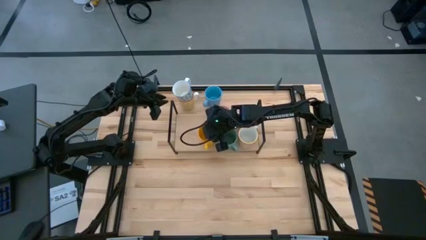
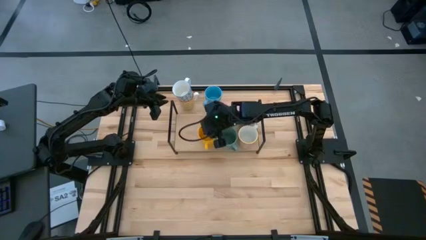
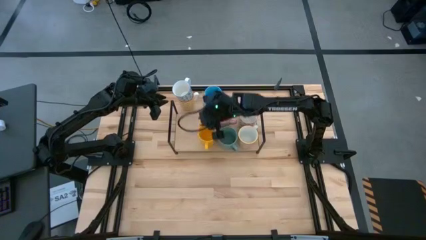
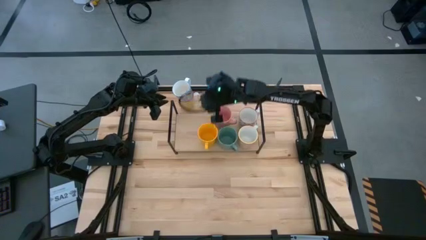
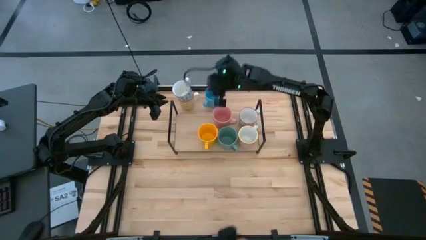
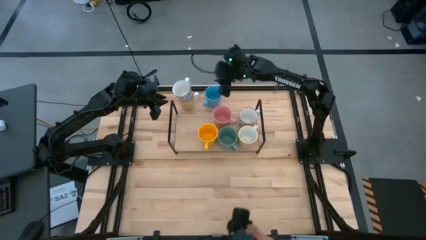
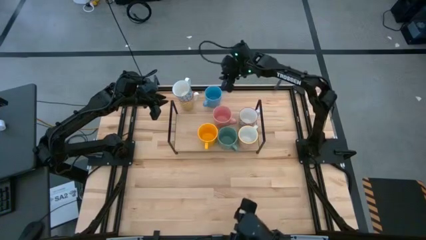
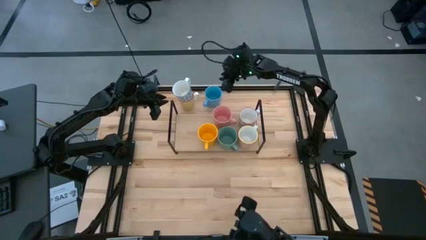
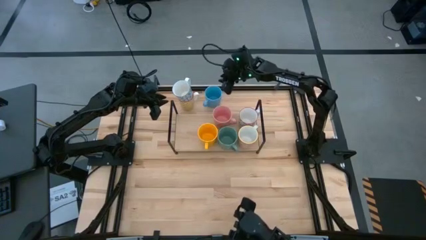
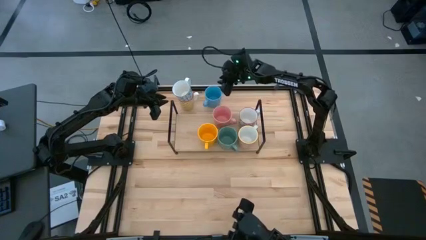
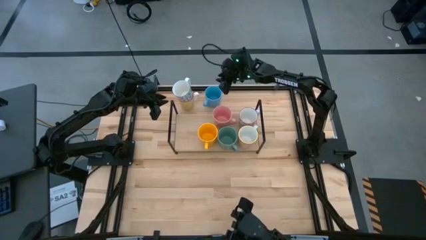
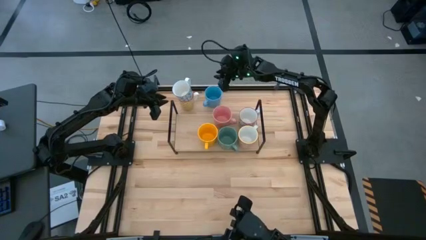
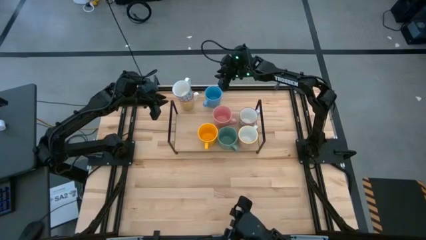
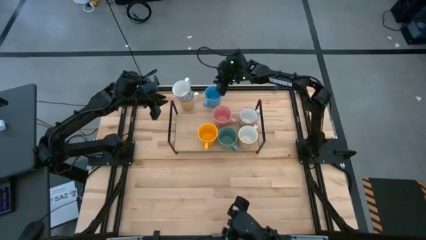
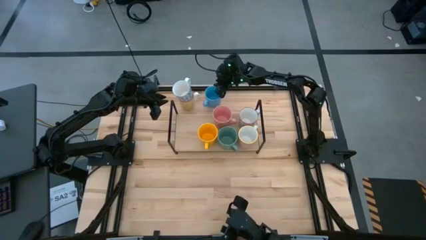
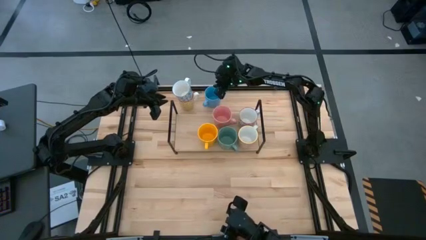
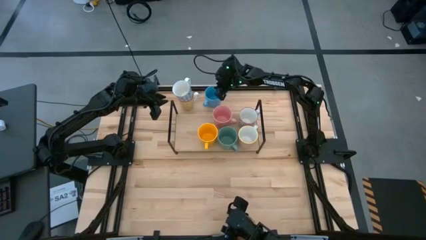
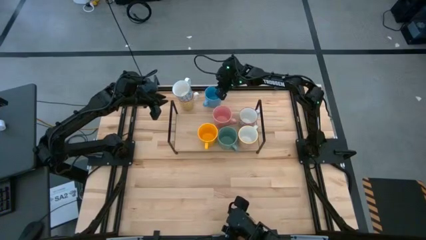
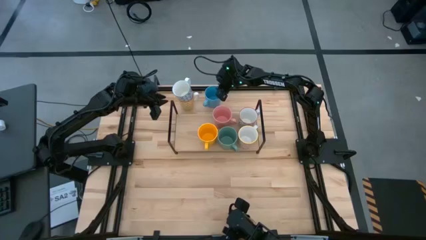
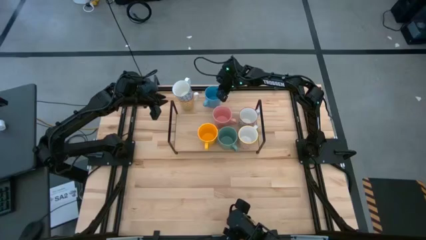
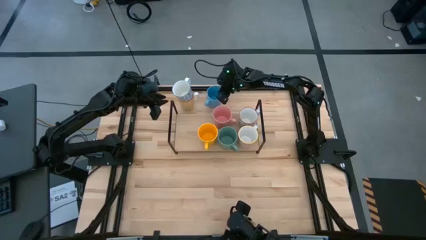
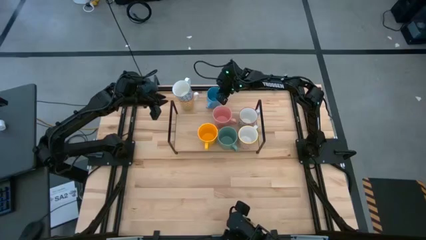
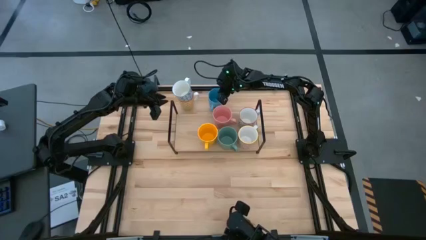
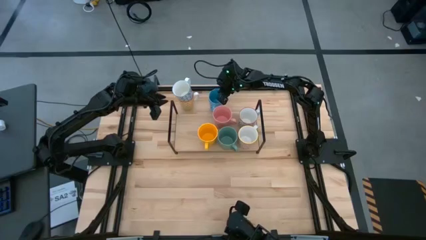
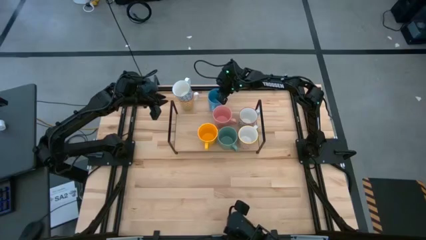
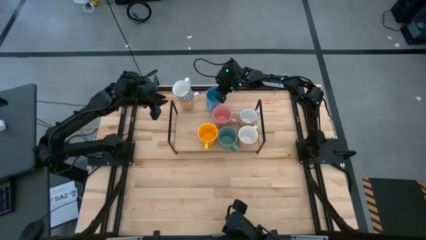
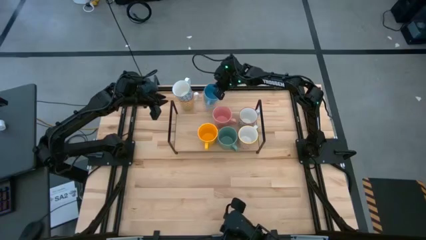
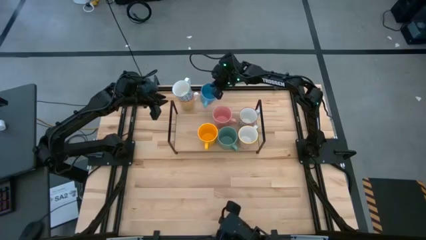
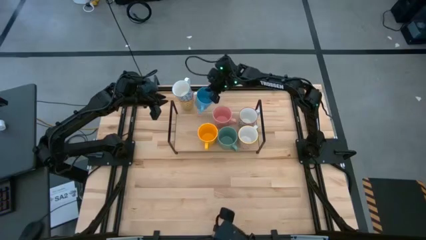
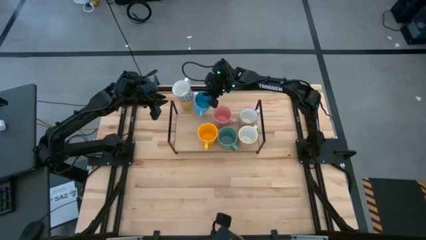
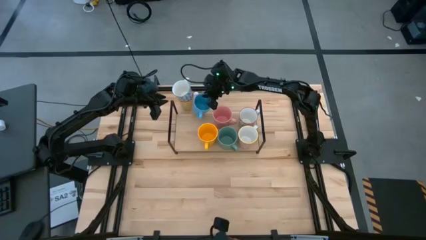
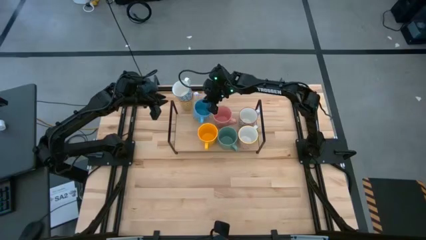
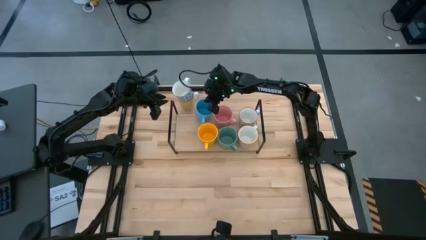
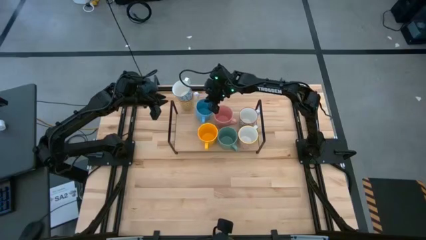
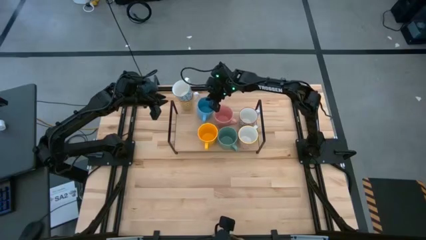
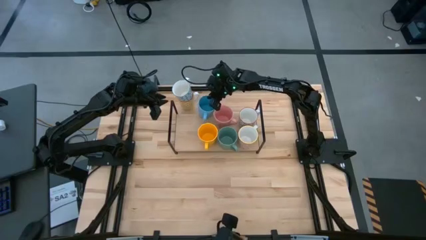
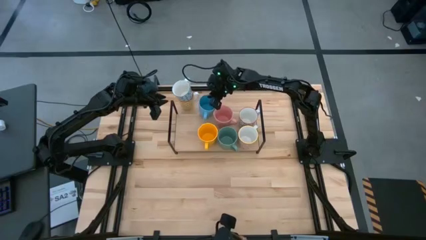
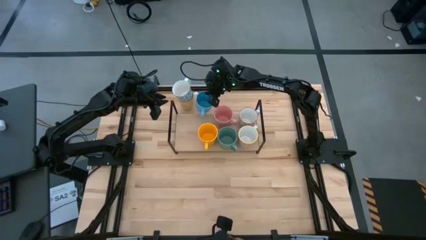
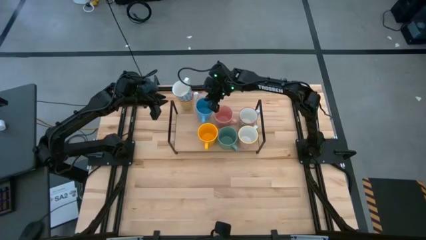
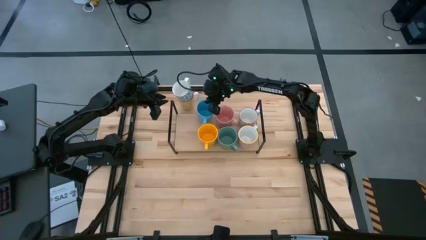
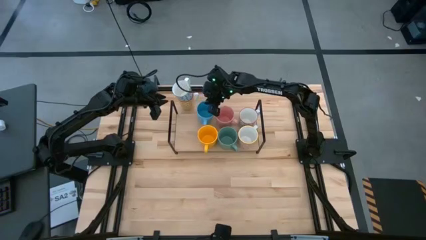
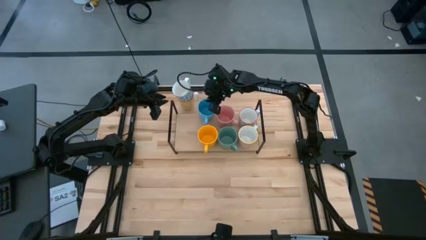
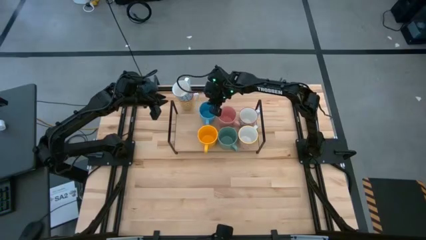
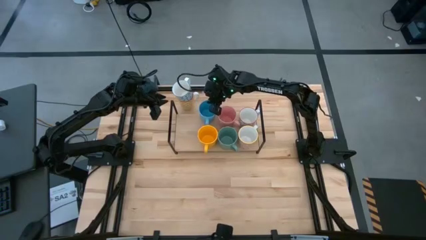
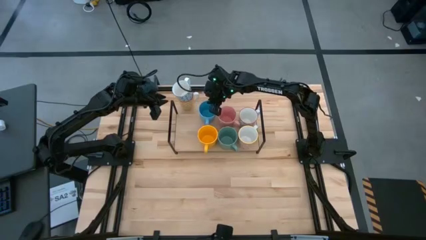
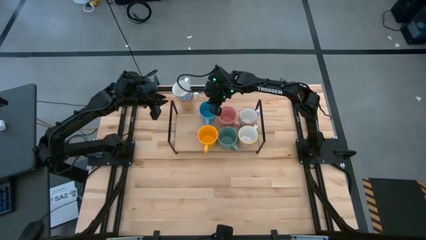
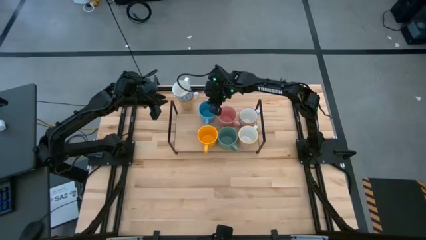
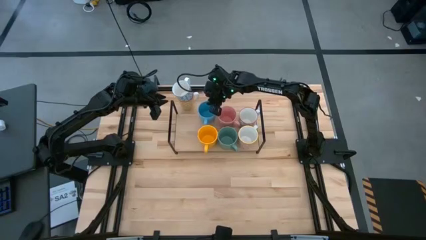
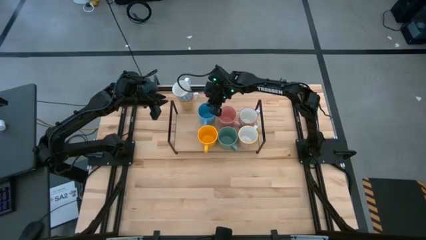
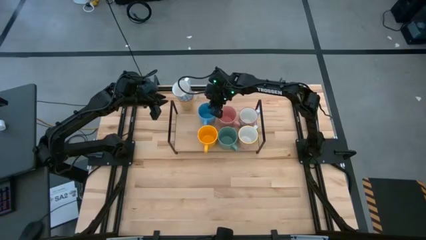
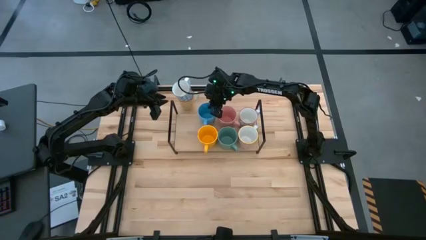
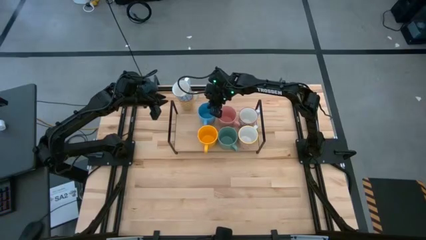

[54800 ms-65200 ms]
Task: Place coffee mugs
Put the blue mug on the shelf

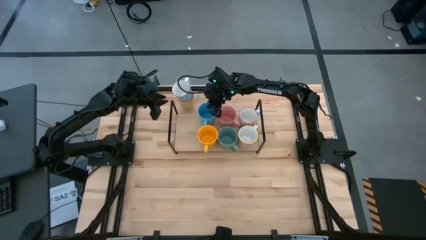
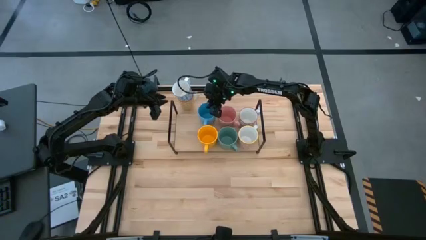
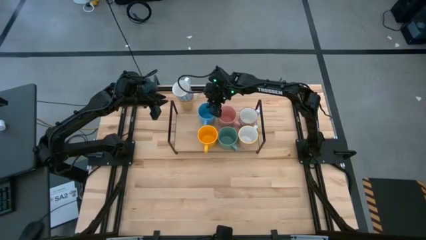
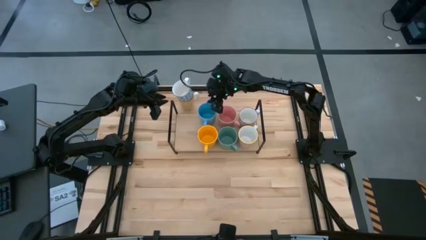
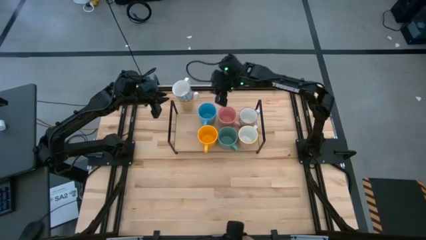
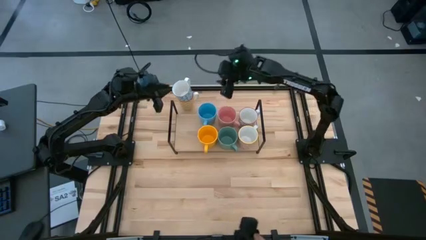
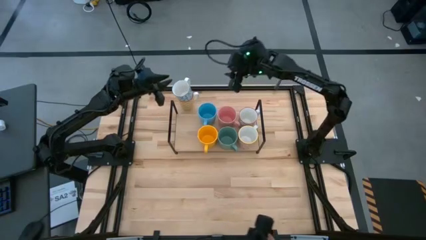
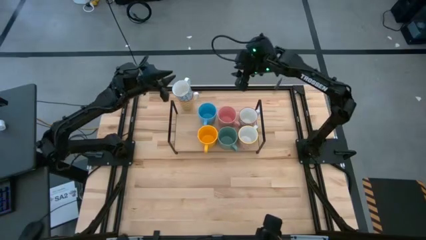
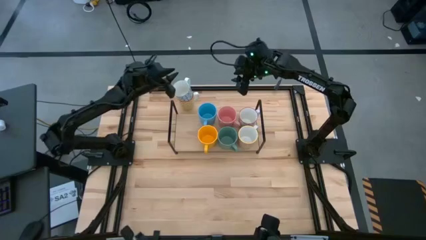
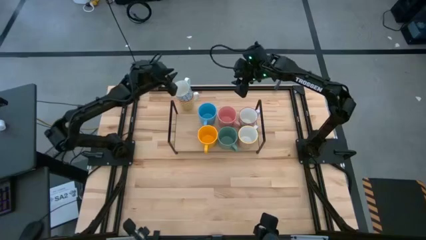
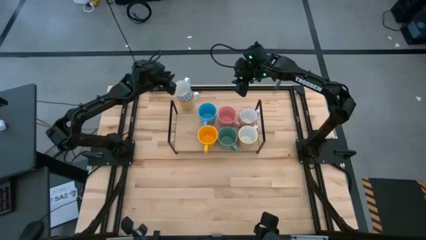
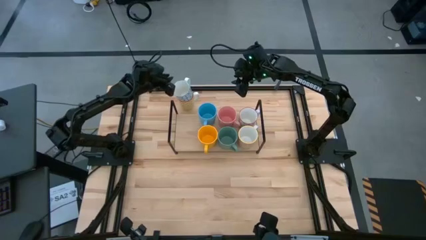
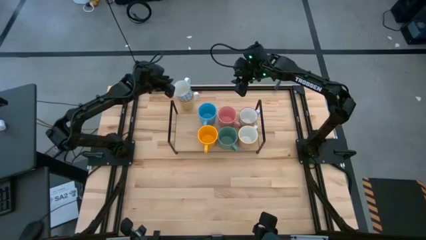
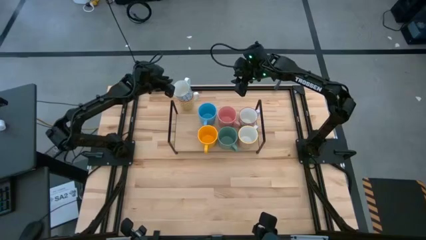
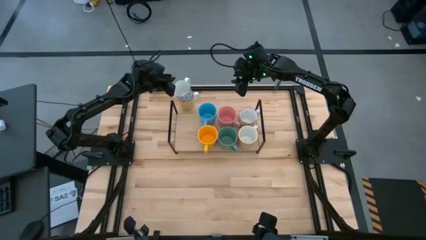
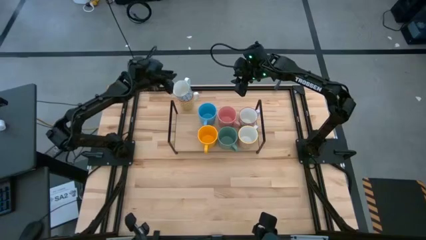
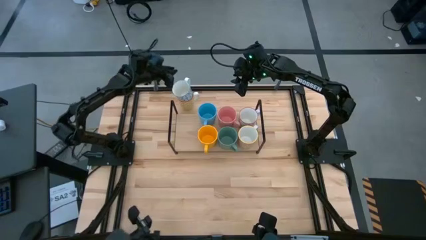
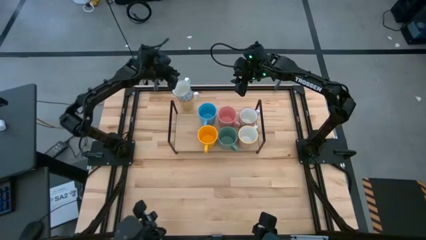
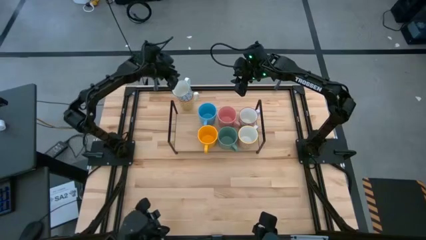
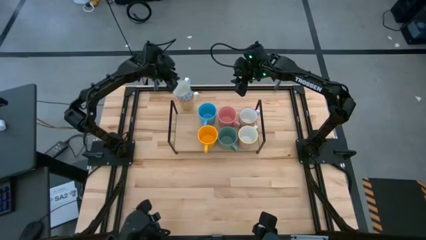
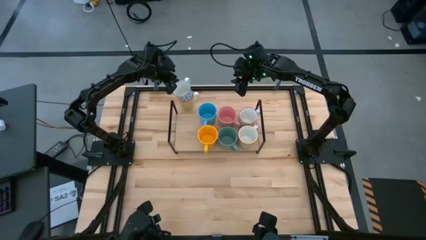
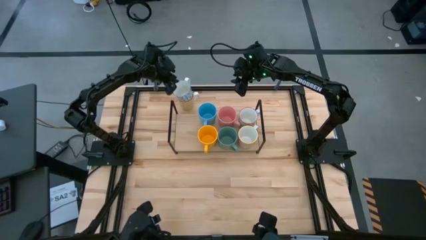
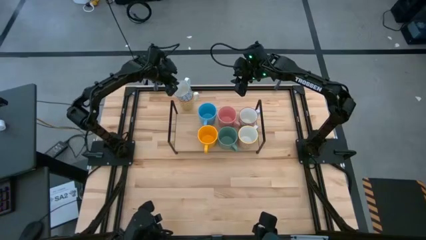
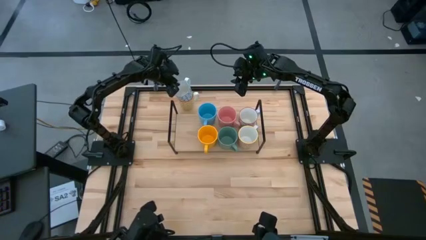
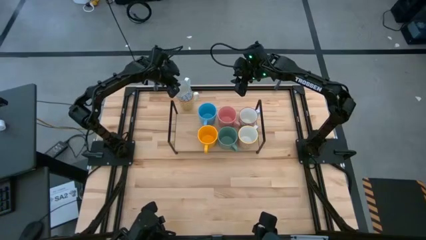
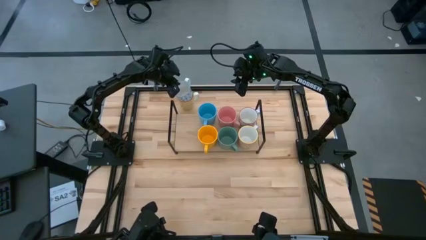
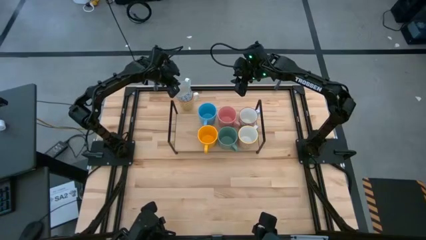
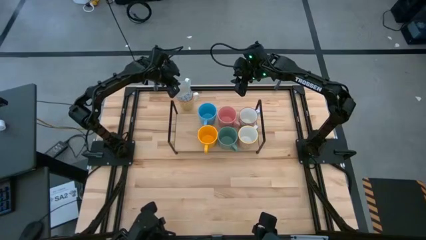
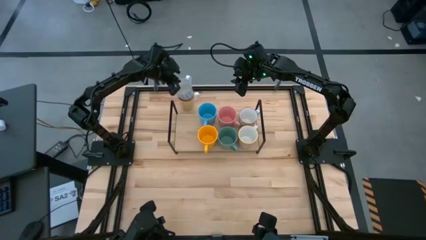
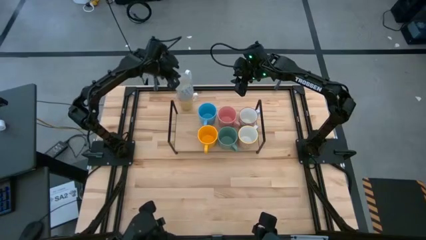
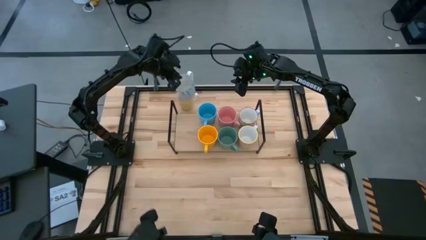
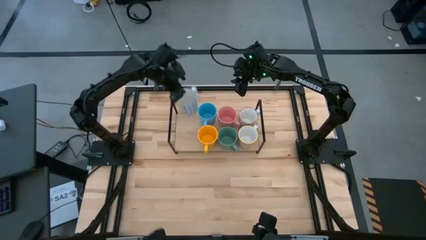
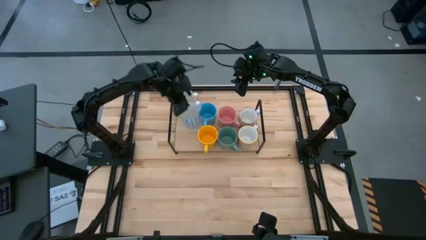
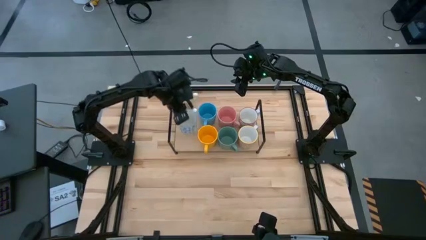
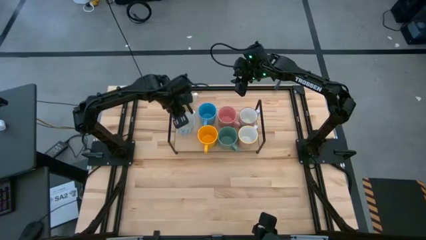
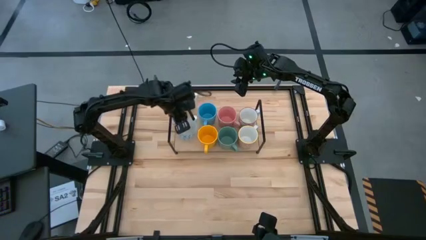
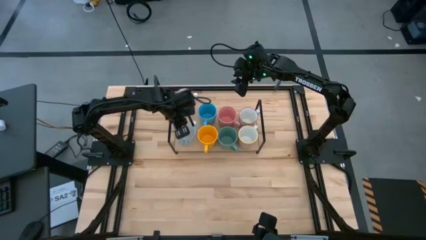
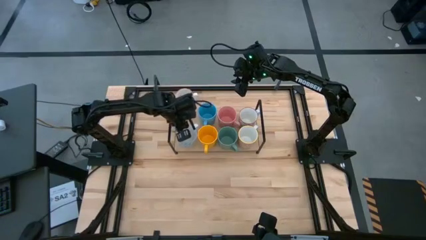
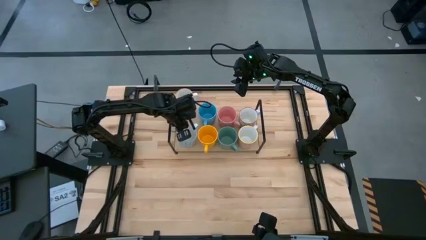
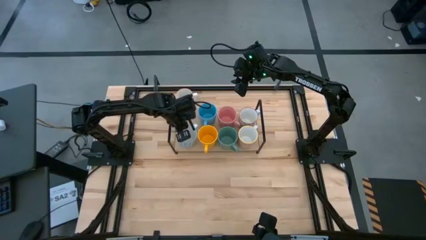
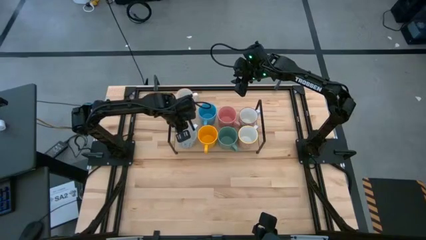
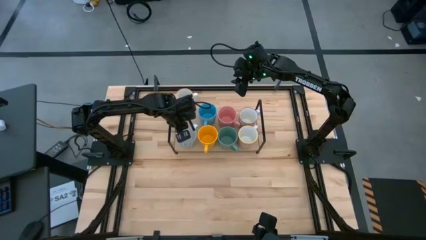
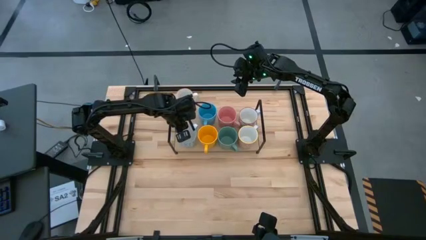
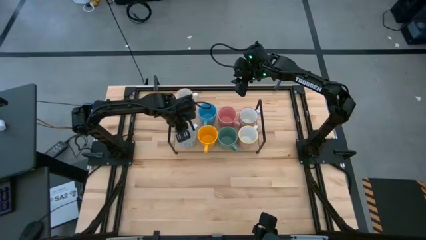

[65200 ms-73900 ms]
Put the blue patterned mug on the shelf
